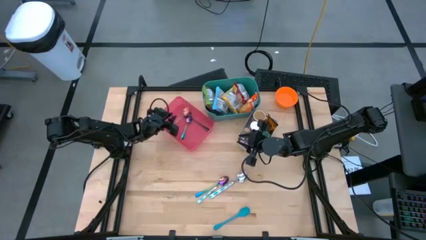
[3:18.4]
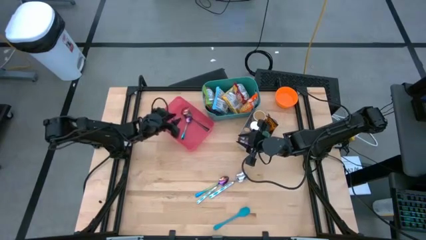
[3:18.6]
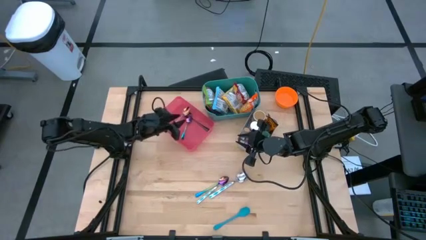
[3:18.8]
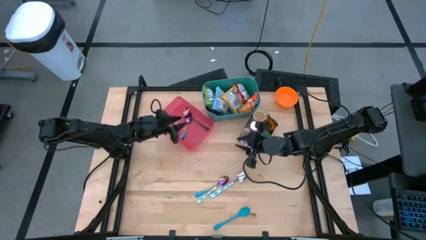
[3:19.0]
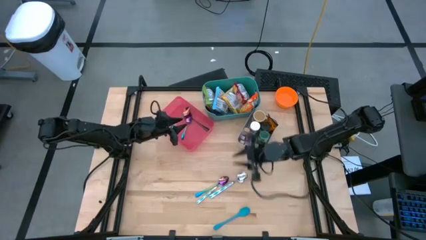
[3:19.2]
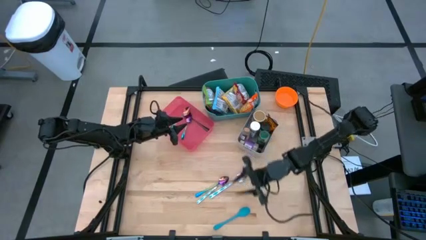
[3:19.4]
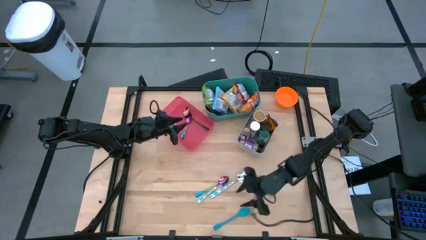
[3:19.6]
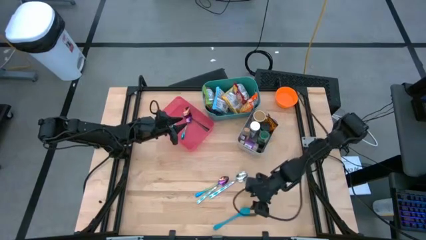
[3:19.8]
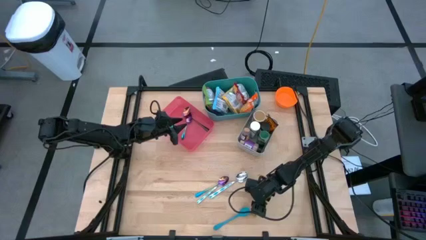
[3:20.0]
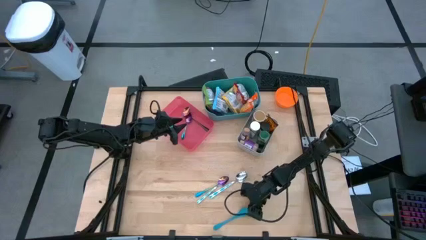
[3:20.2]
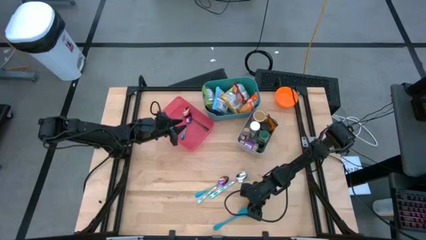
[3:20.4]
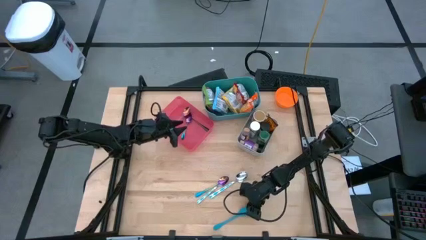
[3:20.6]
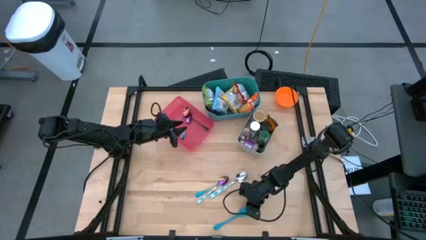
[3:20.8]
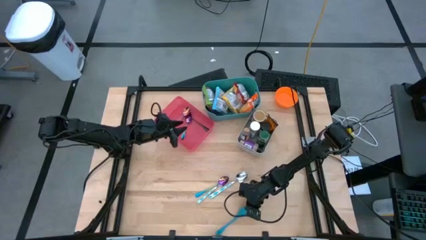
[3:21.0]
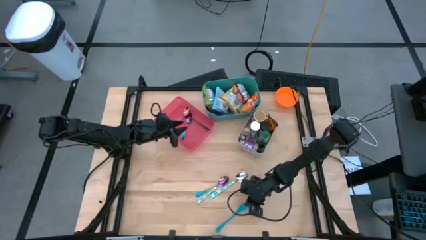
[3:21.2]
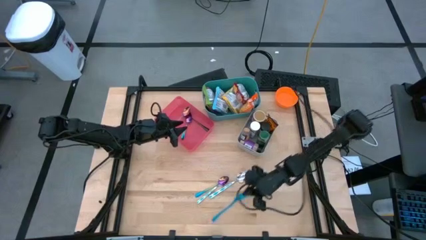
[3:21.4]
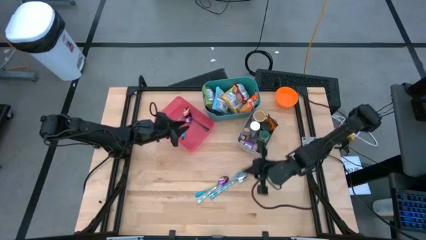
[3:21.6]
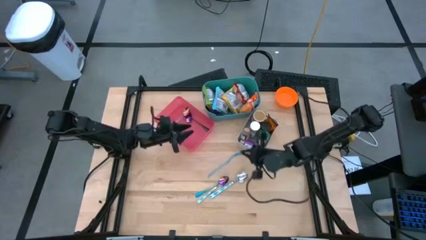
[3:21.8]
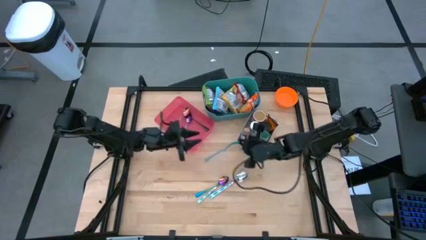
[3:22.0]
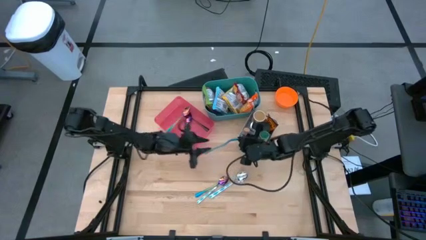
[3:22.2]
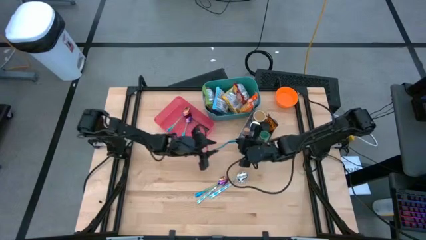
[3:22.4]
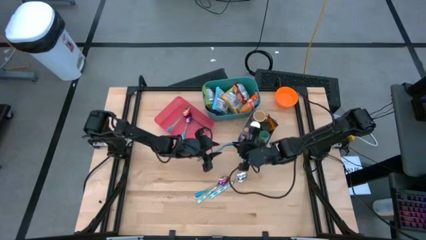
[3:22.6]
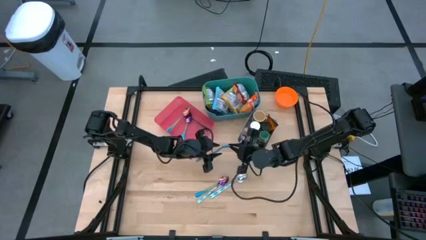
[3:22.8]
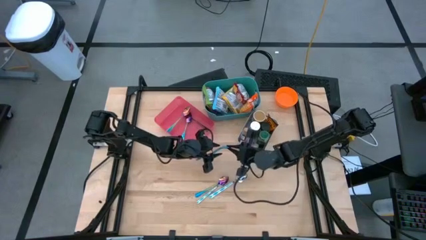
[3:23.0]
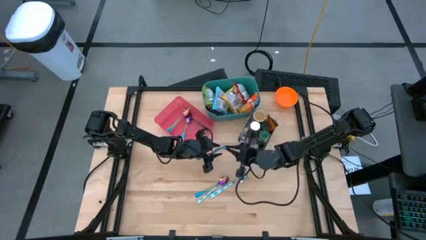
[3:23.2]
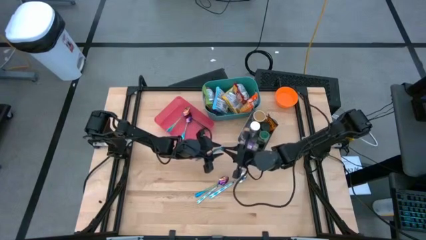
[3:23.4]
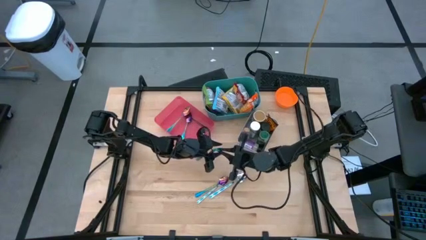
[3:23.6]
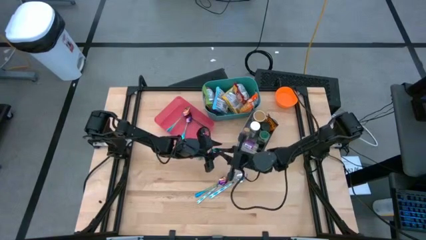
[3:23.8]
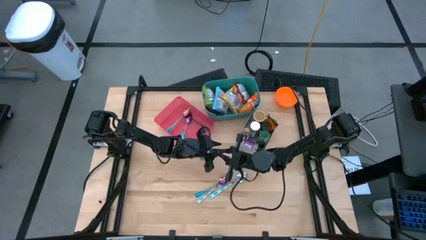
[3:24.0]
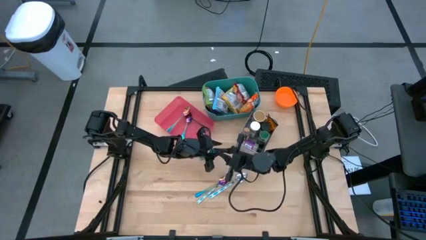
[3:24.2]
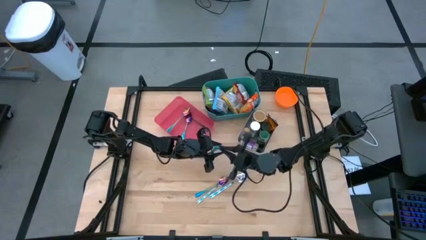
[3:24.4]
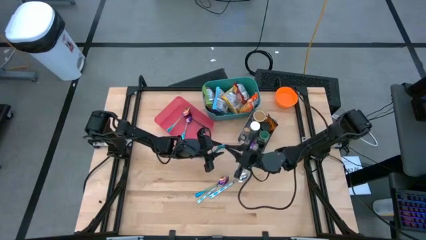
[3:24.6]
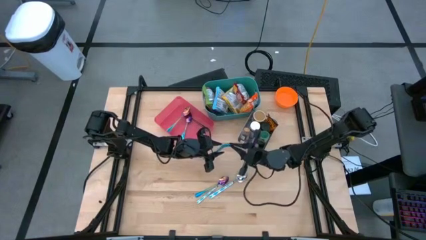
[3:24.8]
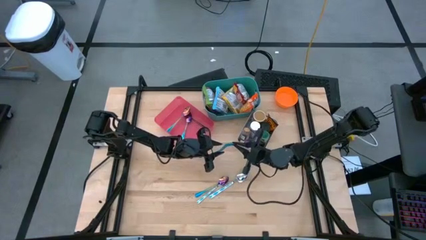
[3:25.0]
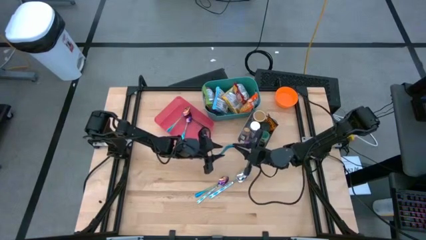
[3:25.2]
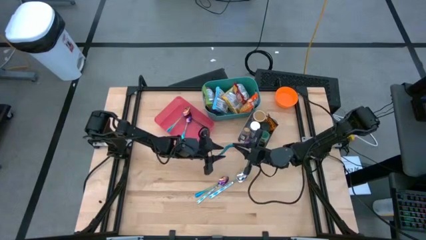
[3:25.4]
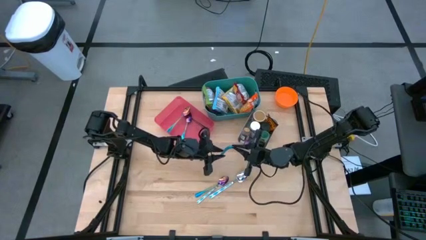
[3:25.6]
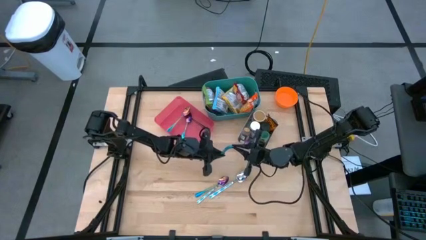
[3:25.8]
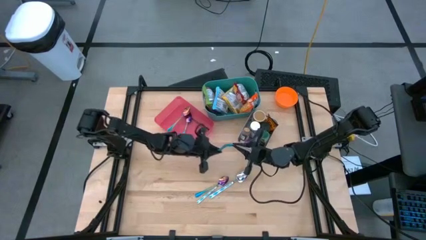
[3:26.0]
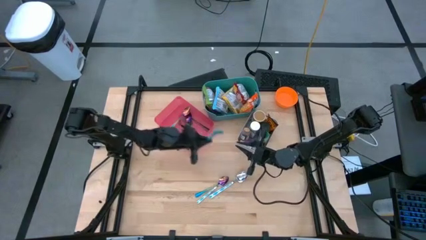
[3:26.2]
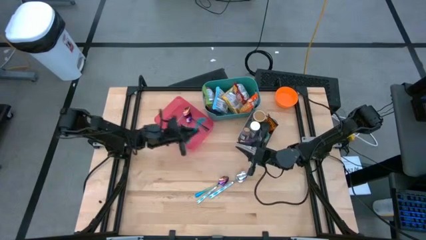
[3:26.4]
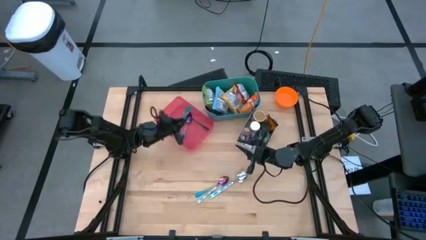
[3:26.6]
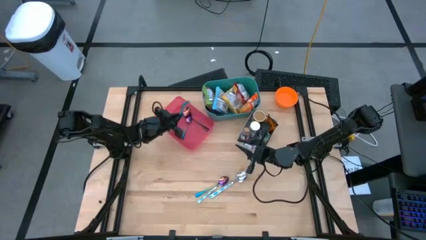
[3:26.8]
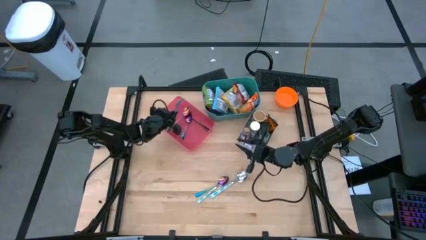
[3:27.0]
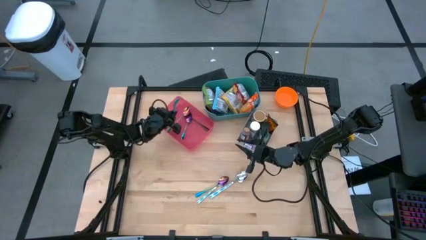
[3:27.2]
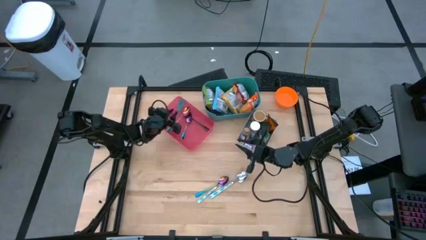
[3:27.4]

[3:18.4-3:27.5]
Task: Pick & Place Food Item
Put the blue spoon into the red bin

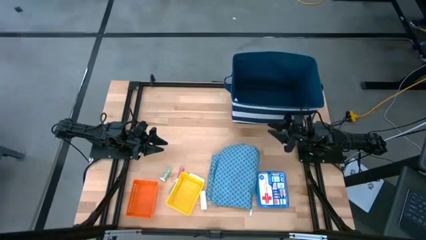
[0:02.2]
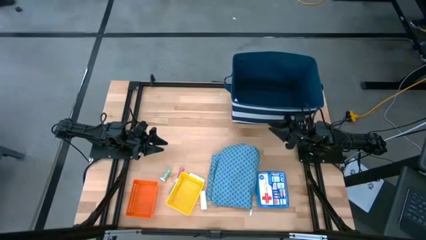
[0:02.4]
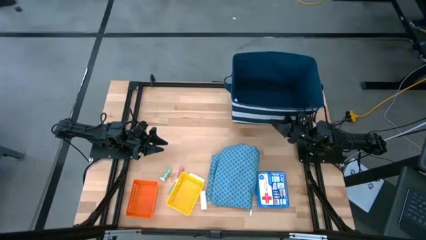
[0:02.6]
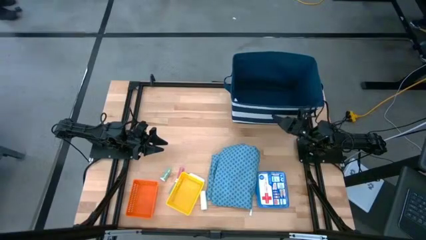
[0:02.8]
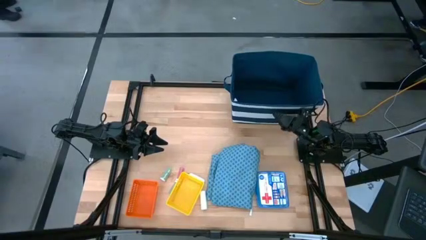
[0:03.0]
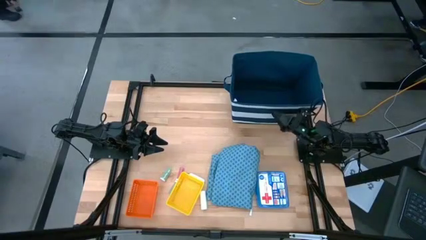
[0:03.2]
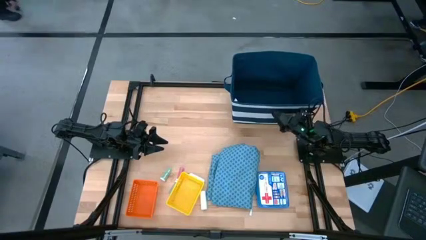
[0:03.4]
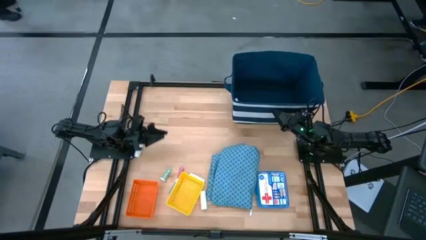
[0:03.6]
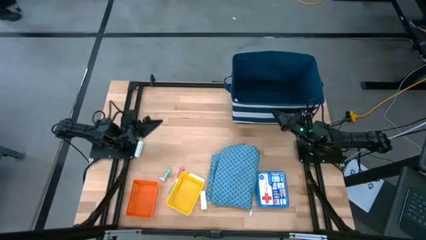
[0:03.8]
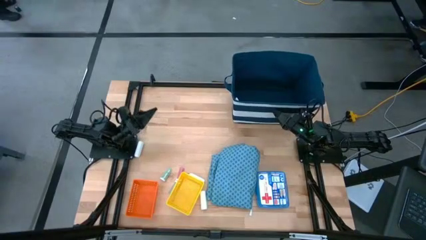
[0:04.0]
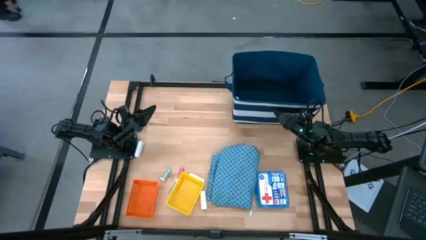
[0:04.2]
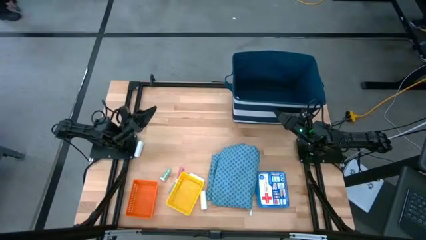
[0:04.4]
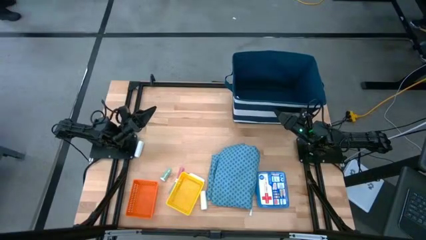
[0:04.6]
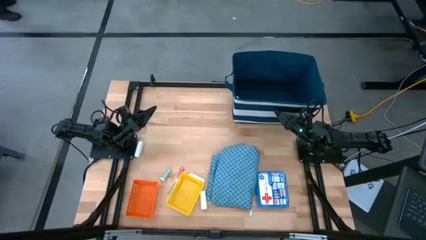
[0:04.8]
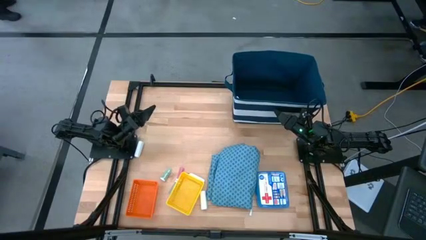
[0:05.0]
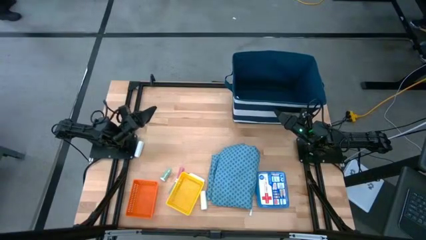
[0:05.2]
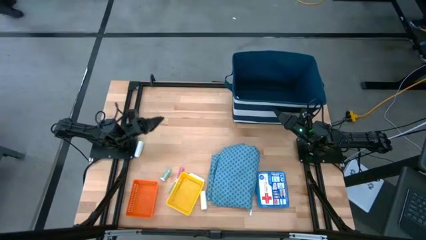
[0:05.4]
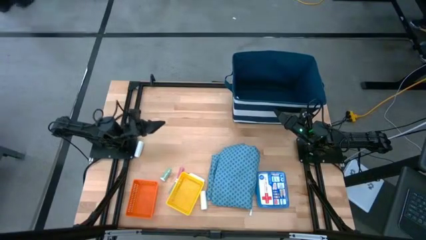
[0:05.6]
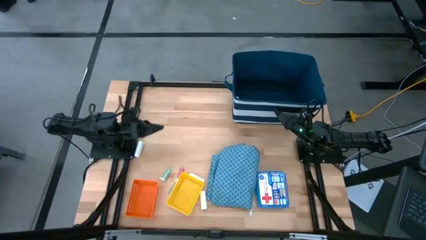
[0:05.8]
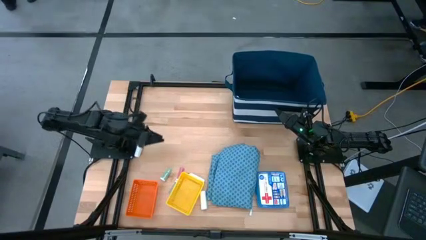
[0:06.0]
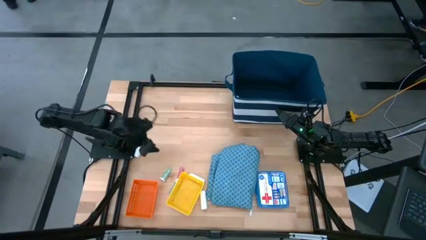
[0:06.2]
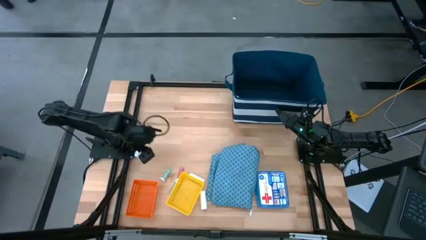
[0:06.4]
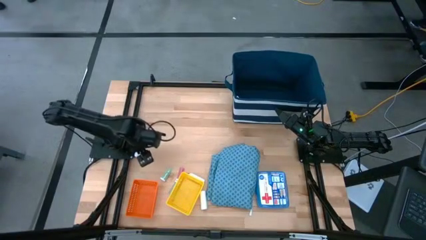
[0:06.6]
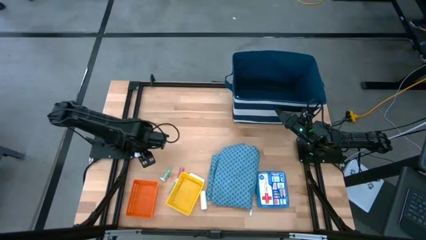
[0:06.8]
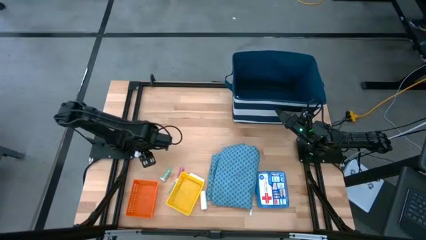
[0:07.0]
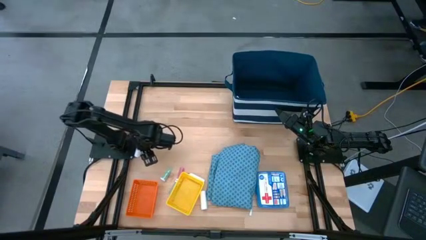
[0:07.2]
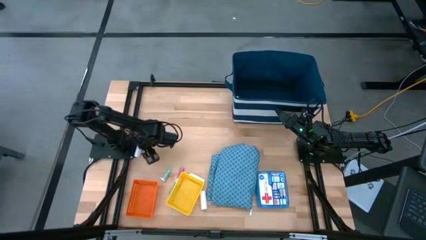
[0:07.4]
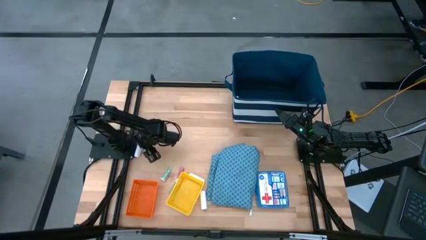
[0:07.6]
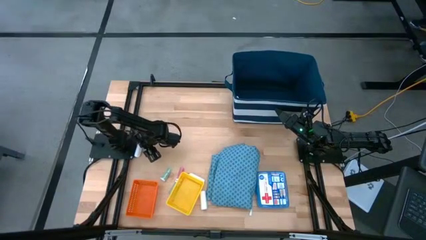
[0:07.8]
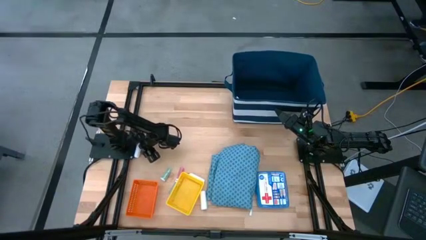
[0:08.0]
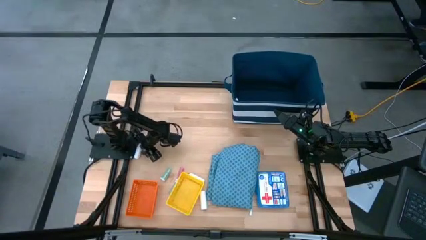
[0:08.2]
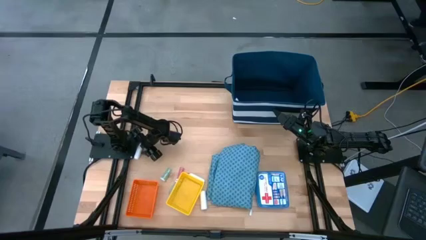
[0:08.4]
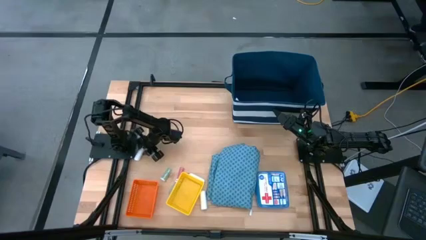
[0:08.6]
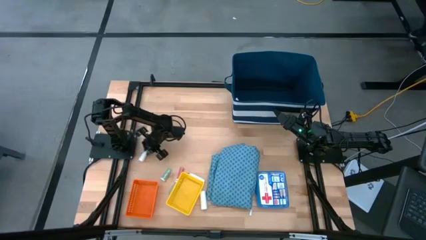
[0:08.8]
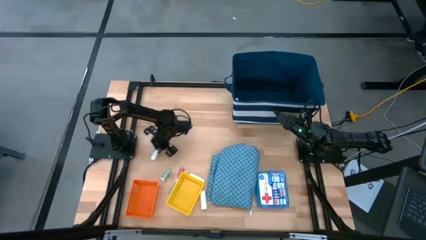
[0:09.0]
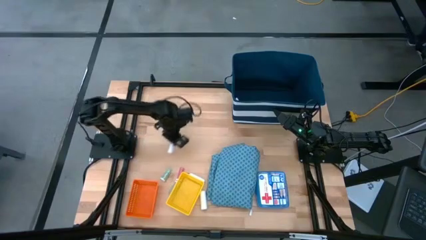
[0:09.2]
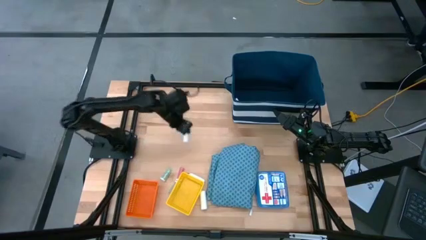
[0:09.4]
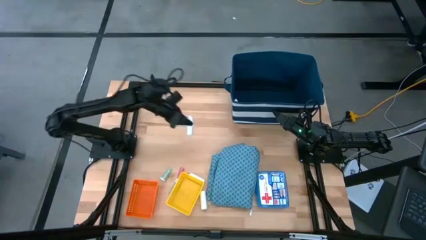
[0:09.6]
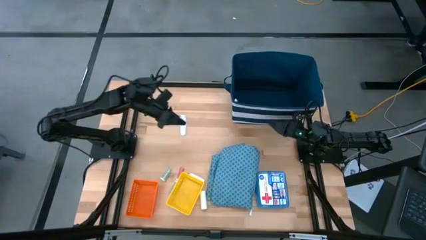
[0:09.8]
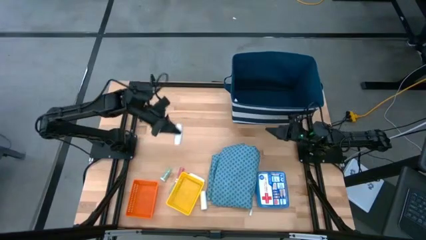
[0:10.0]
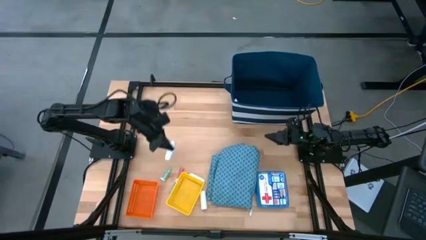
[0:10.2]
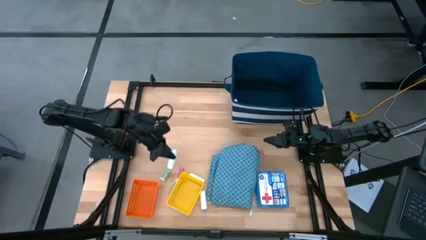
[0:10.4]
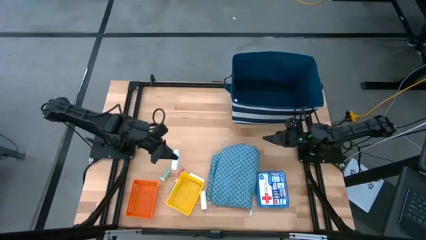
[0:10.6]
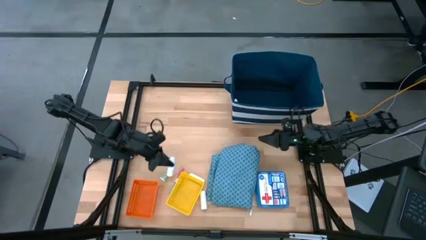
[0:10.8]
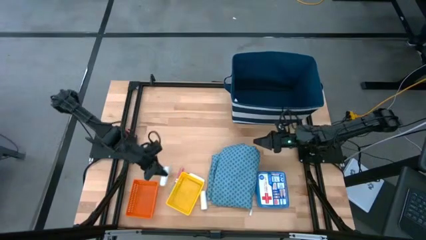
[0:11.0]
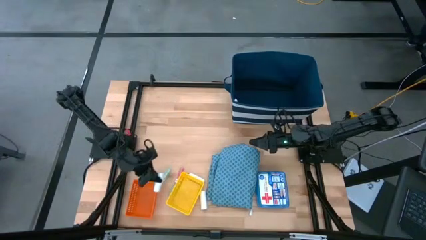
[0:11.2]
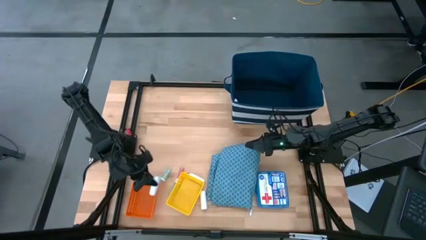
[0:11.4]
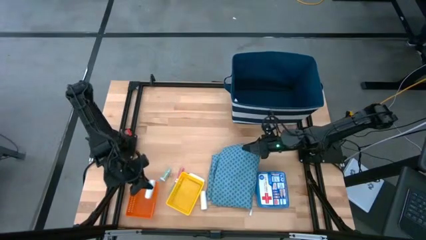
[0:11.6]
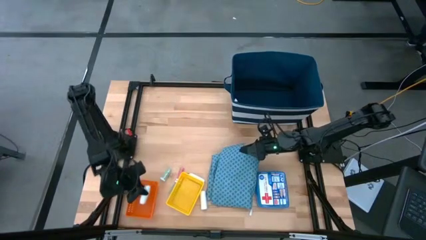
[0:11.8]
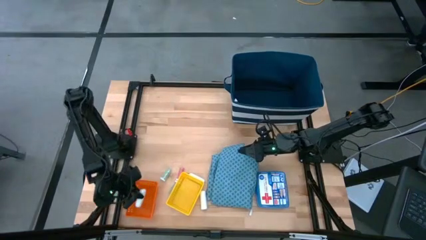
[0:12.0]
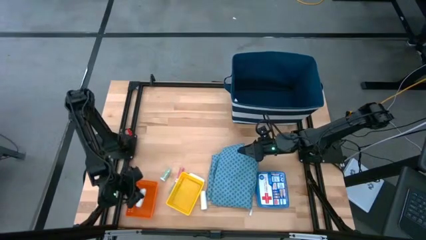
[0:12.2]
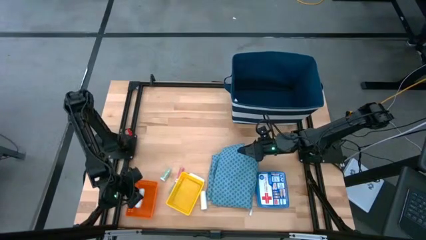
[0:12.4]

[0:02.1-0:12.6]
Task: Pick & Place Medicine items
Put the top left white rolled gauze into the orange bin
